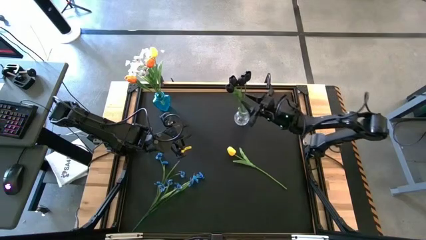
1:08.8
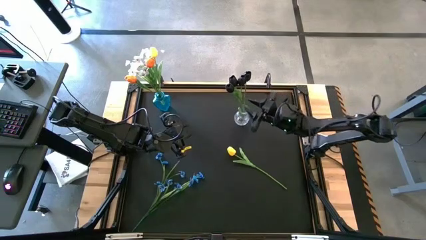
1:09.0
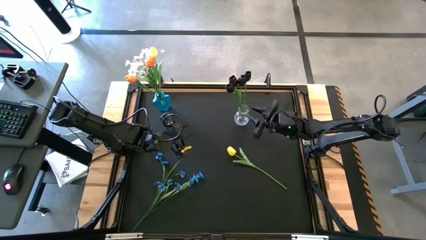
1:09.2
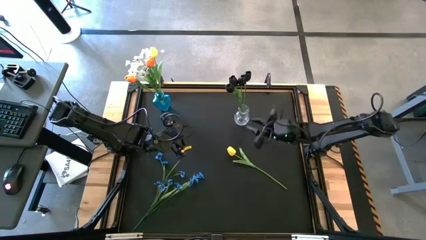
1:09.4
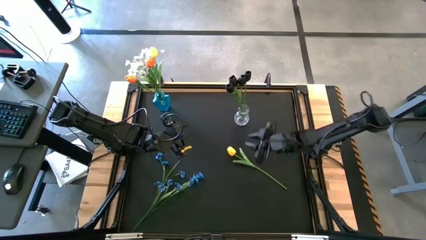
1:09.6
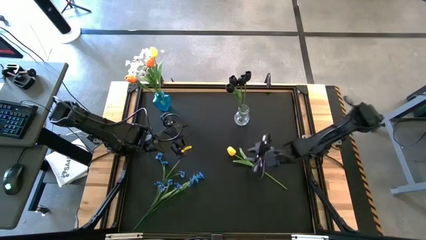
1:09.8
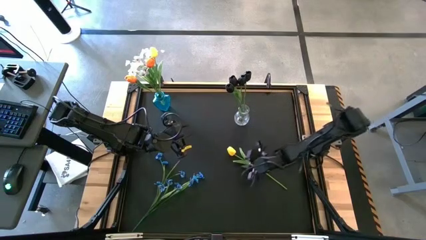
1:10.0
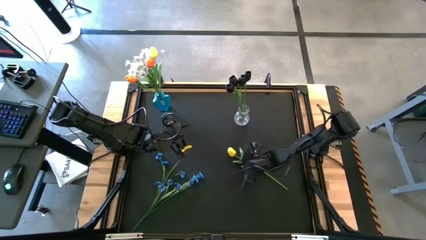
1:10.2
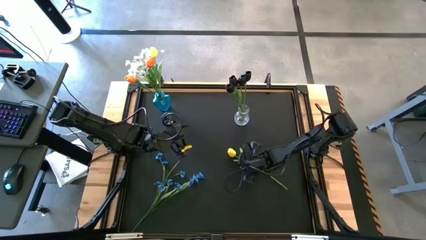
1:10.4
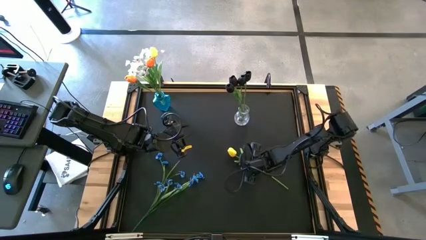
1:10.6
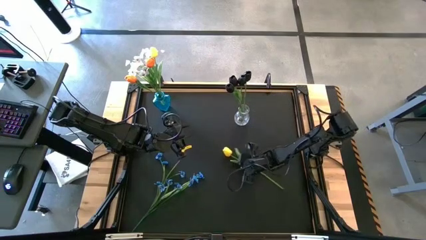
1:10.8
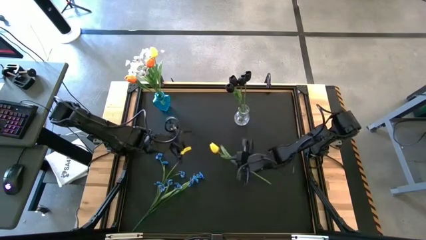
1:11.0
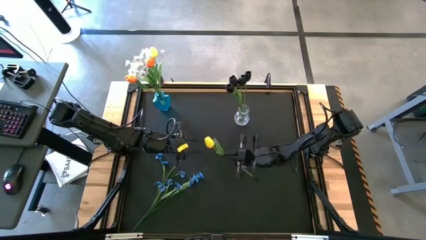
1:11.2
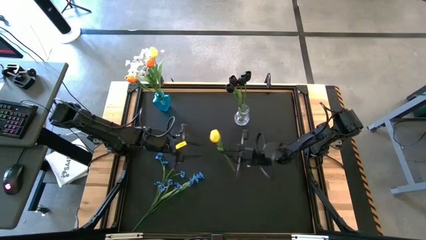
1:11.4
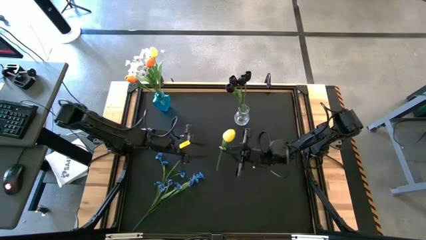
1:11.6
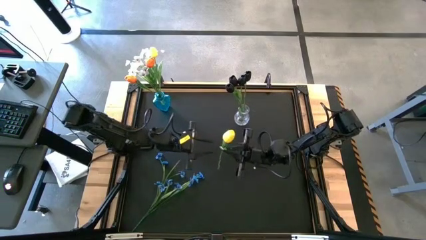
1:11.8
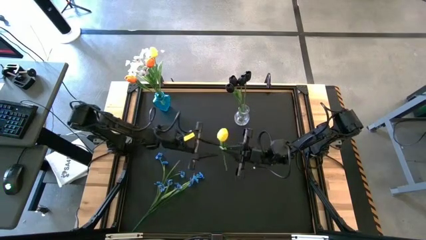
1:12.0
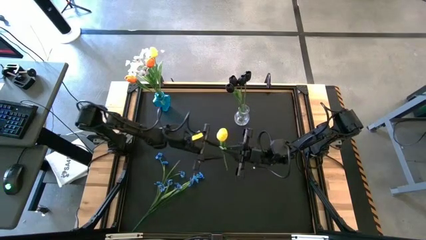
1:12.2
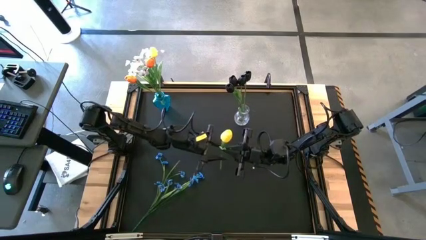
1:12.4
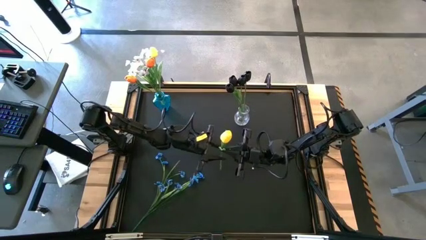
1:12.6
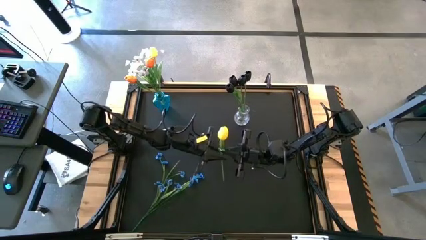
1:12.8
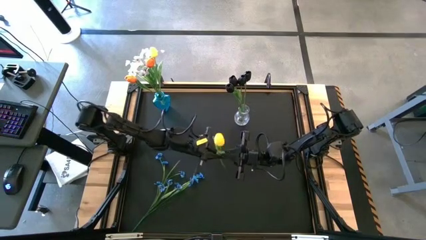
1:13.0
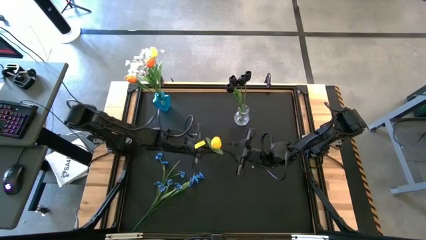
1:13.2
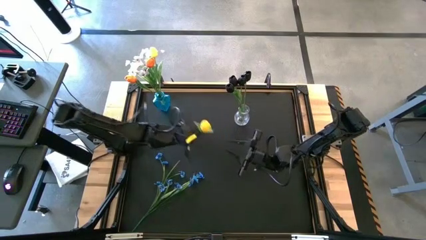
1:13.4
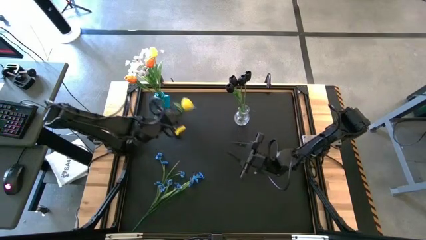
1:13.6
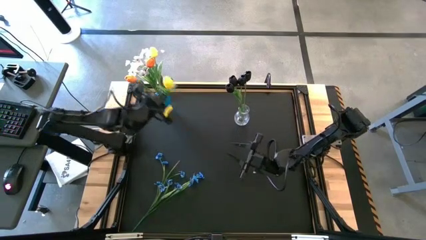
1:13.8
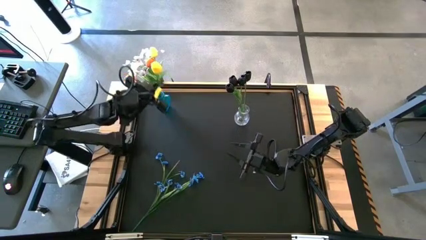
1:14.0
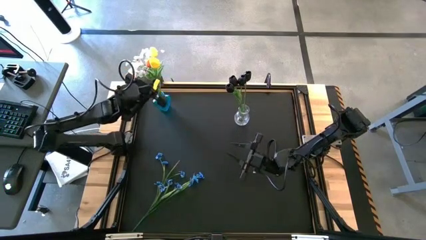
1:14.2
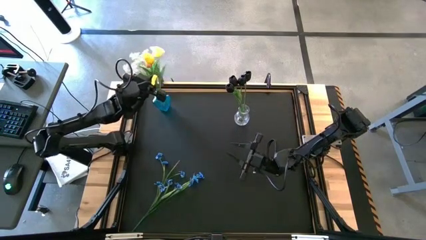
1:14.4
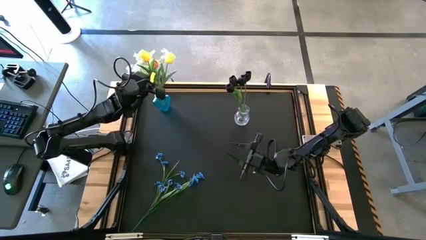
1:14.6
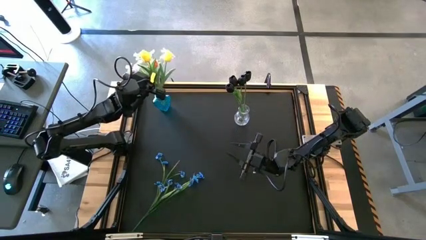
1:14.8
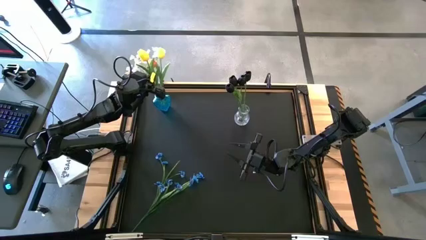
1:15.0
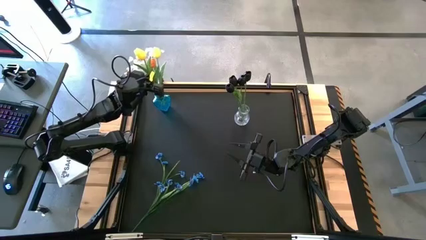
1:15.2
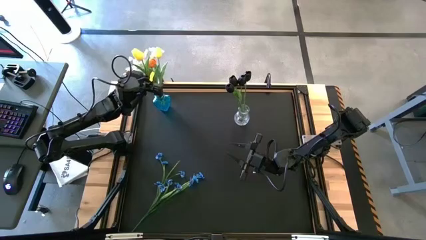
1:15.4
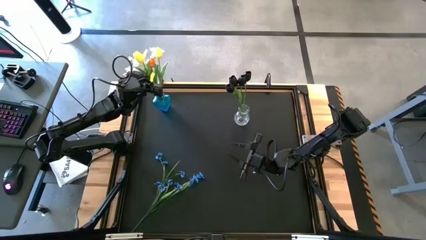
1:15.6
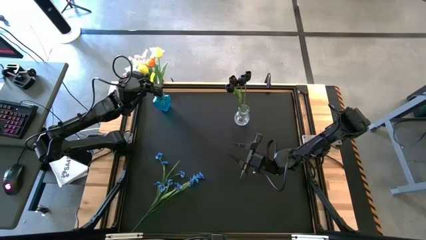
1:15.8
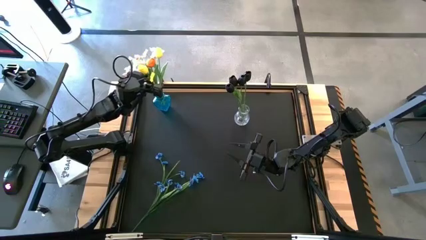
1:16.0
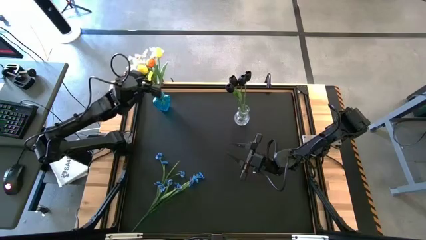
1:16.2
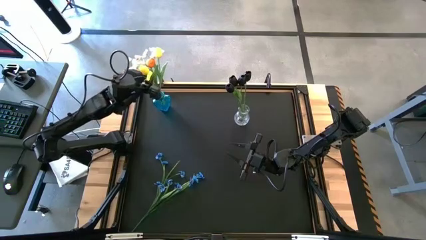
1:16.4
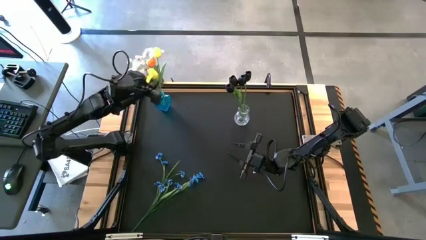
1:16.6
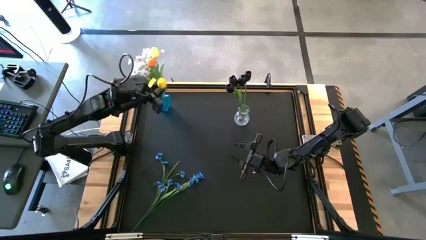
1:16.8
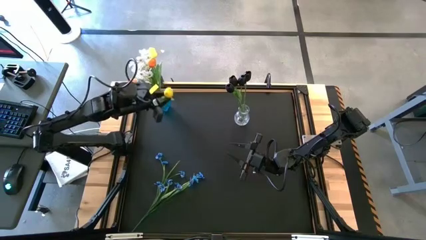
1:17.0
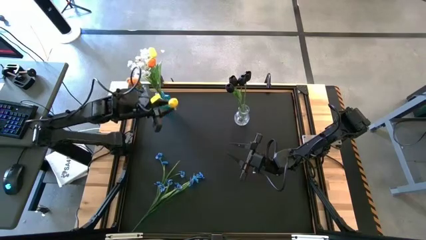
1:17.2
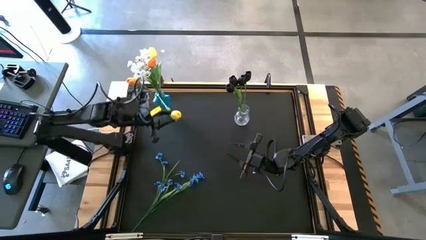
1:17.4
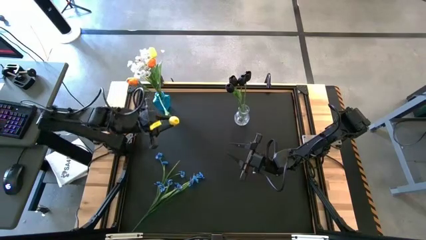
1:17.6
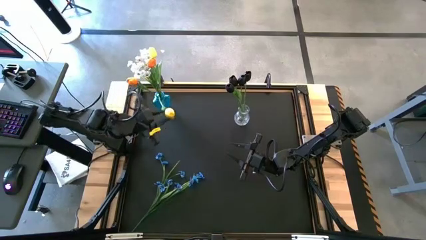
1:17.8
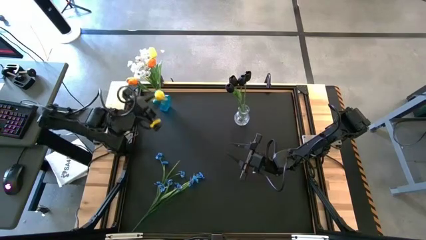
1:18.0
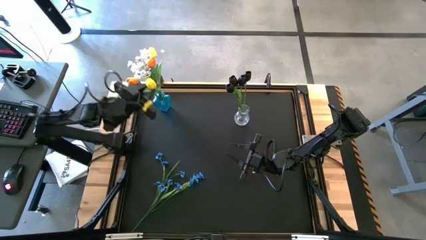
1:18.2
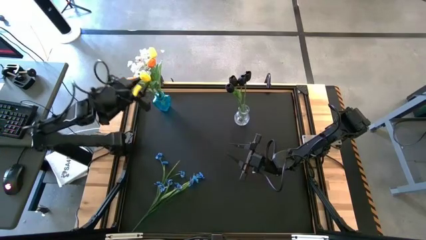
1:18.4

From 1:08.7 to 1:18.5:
Task: Sort flowers into vase by color
Put the yellow flower into the blue vase

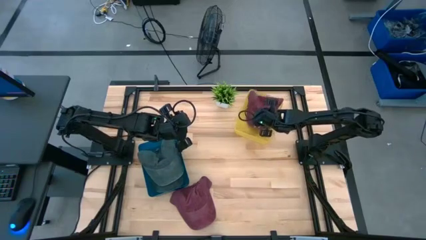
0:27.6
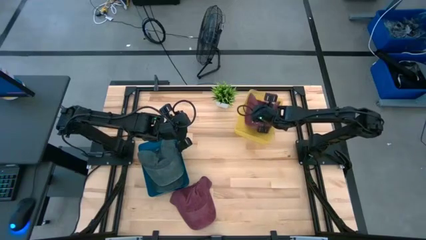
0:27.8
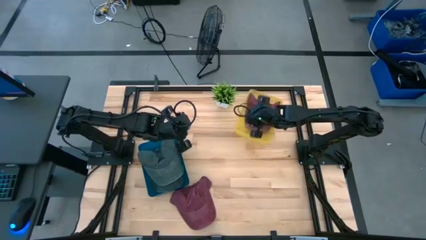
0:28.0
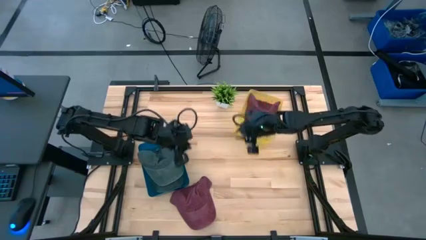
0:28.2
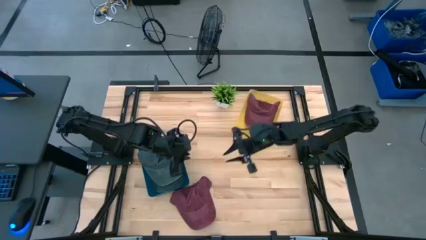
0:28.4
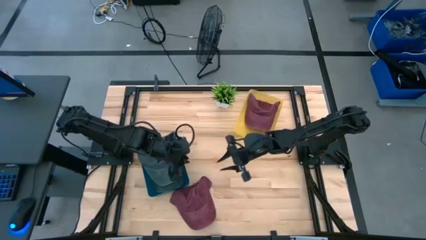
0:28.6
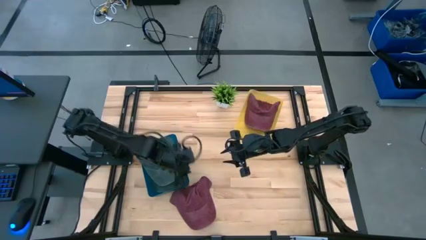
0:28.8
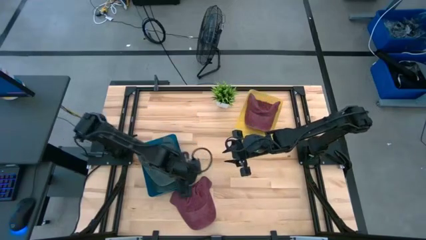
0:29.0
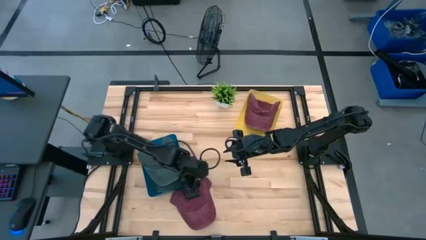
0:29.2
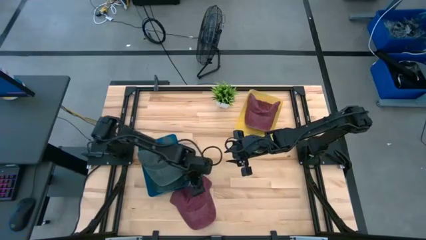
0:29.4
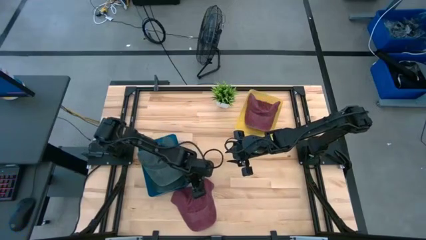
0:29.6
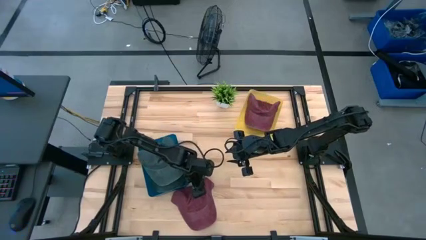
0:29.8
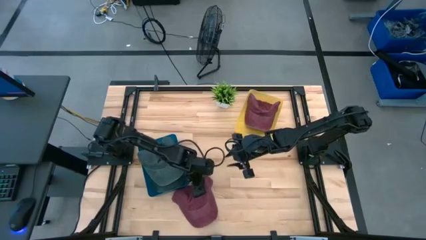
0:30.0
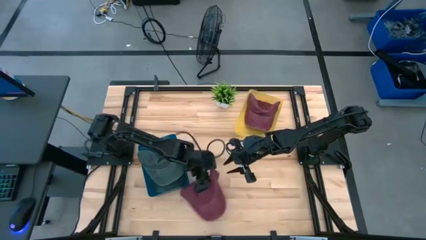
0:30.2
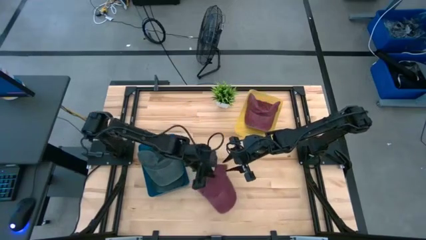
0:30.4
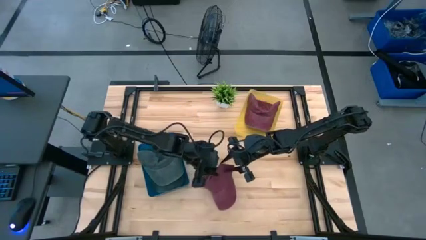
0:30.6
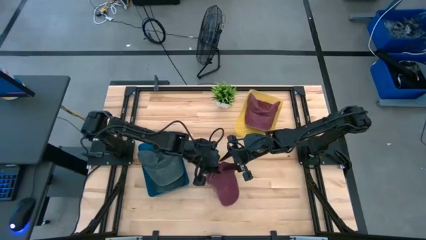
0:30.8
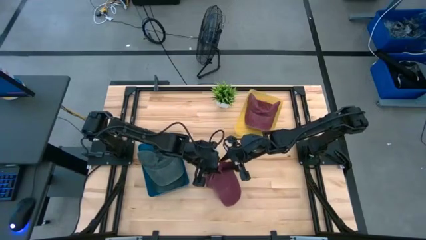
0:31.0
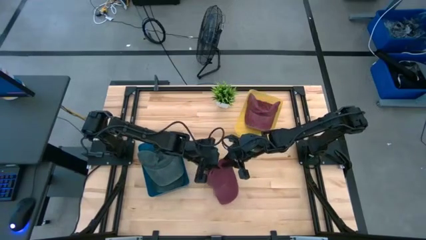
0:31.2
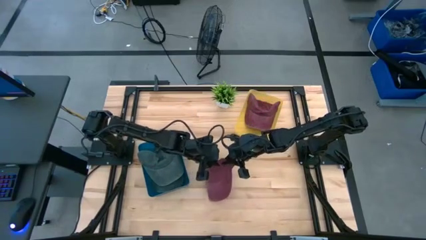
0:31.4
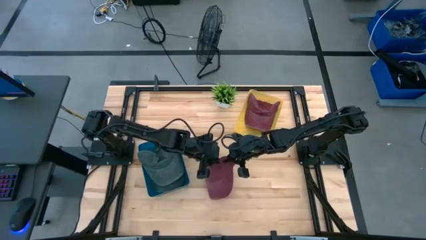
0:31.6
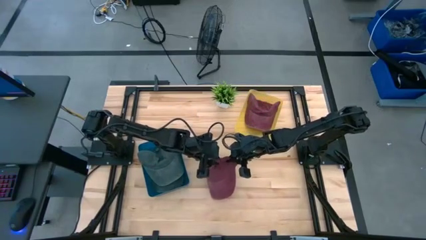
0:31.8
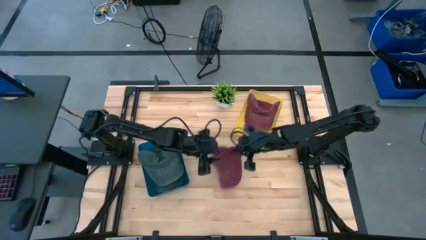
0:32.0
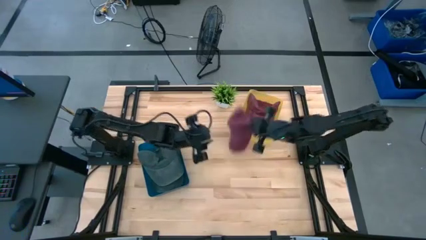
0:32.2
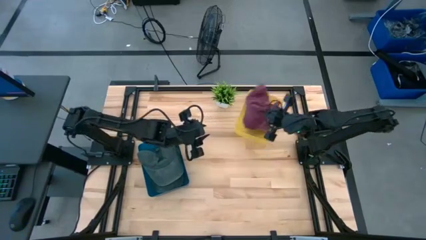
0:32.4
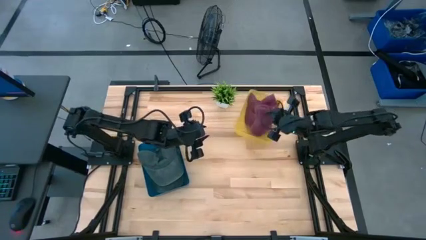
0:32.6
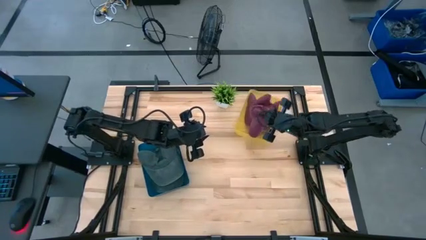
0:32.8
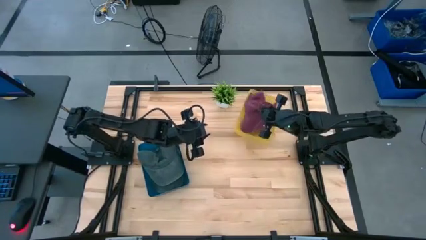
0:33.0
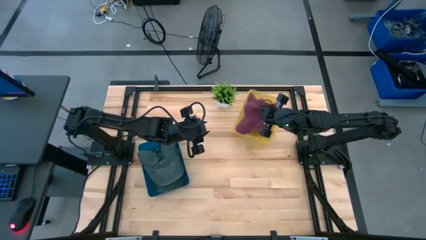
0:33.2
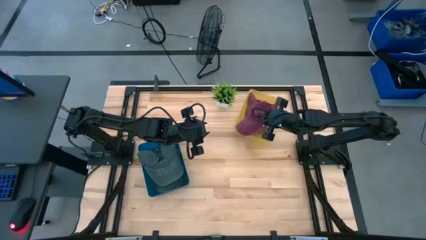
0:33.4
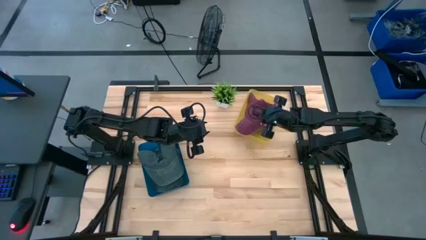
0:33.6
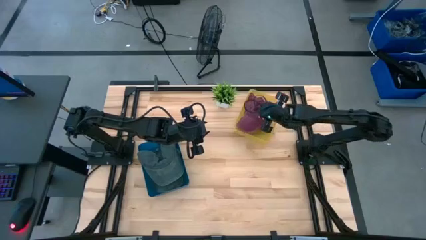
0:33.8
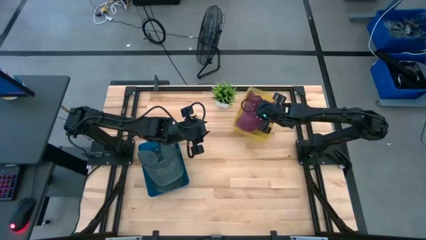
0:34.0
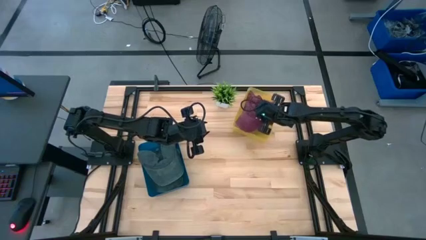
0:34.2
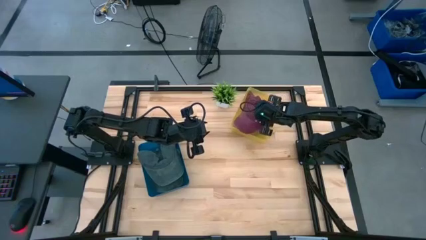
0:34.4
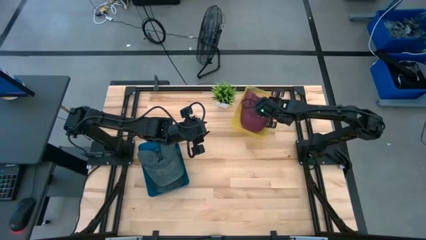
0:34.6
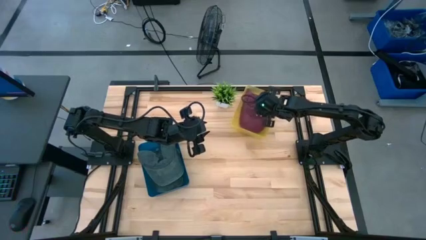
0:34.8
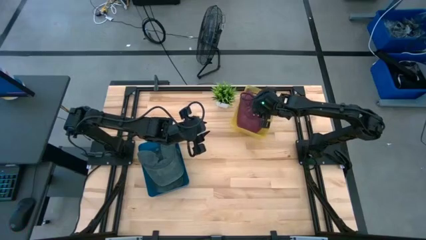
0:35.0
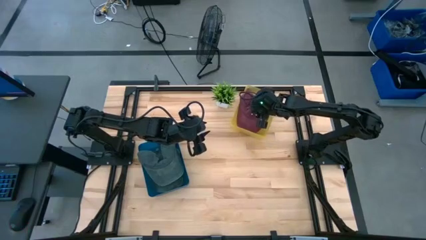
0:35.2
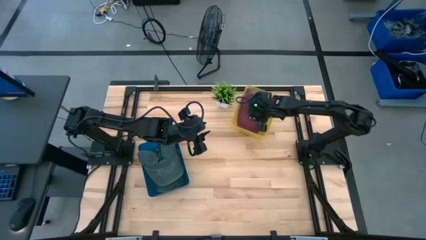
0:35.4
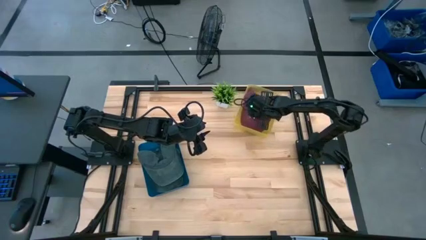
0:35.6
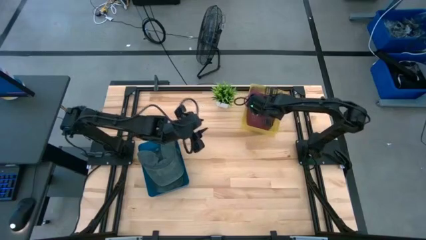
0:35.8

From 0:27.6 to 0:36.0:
Task: Pick & Place hat
Put the red cap into the yellow bin
